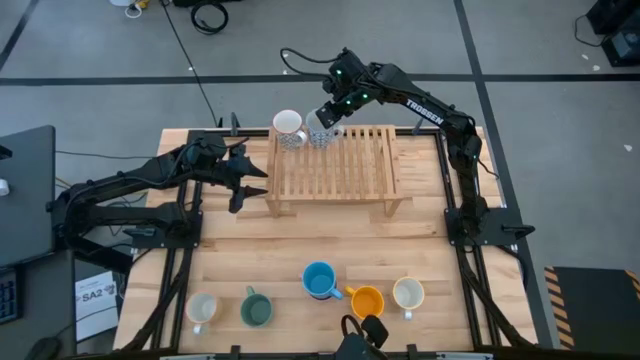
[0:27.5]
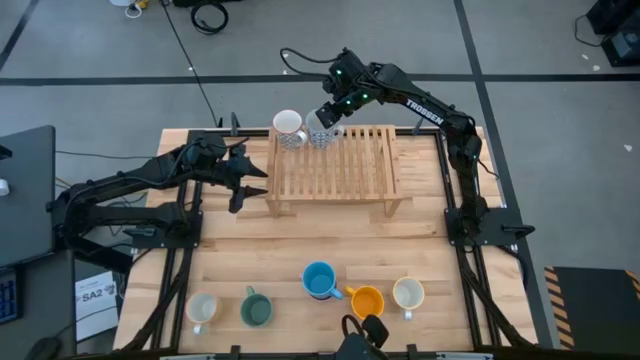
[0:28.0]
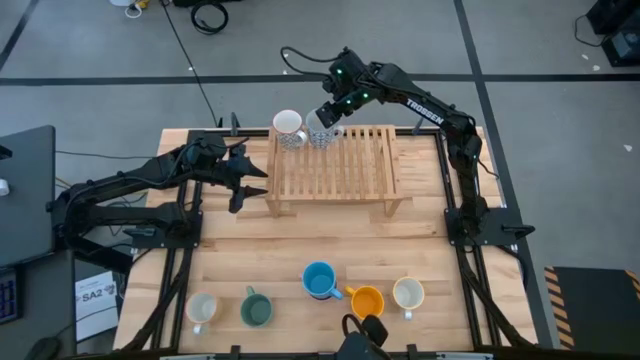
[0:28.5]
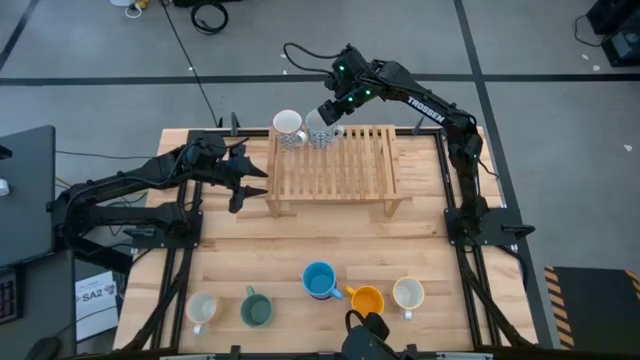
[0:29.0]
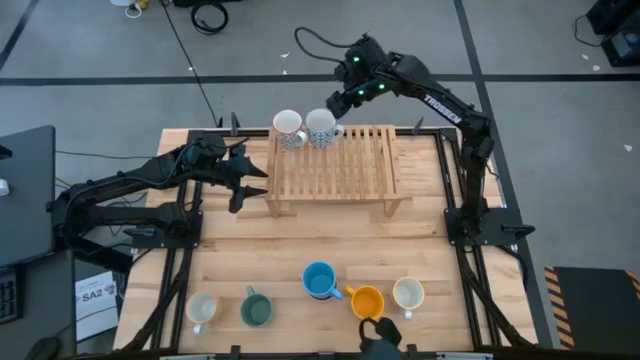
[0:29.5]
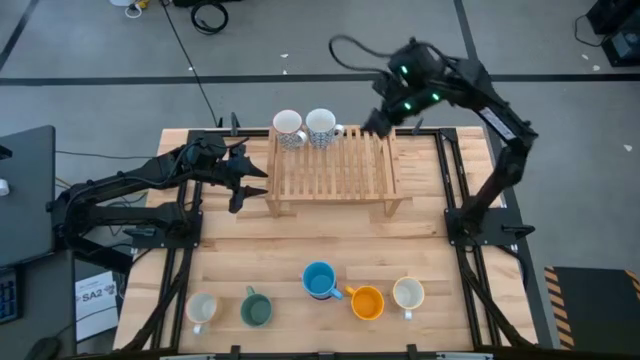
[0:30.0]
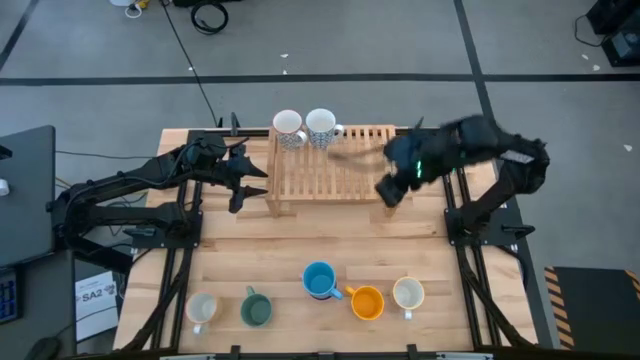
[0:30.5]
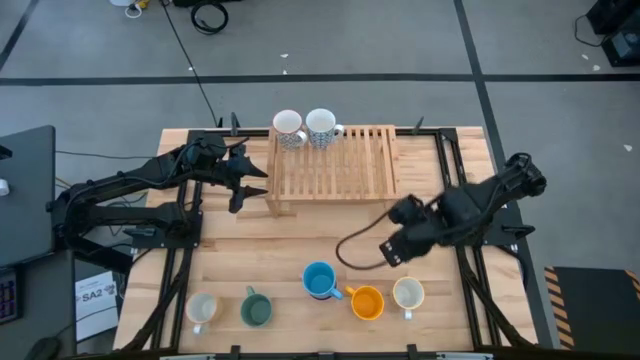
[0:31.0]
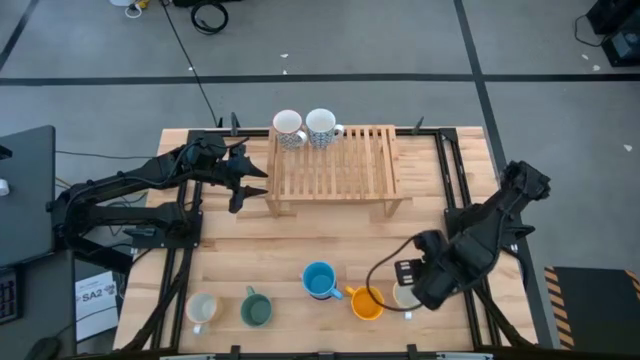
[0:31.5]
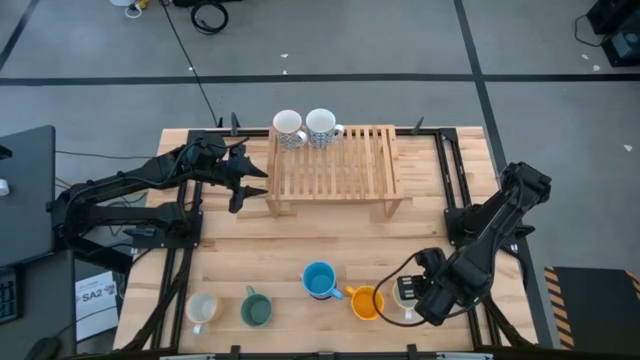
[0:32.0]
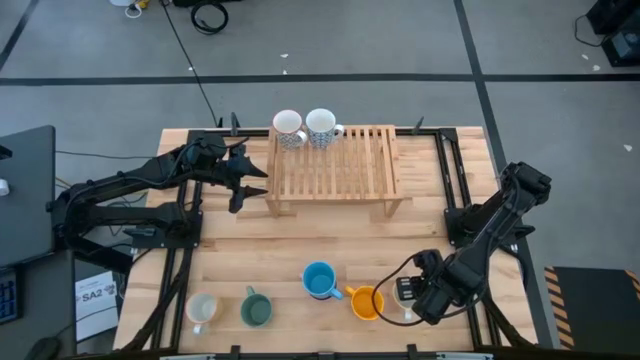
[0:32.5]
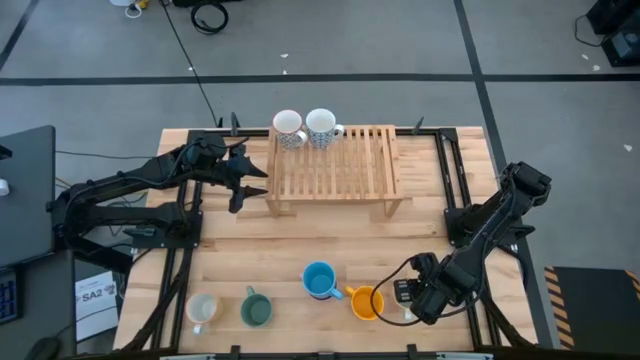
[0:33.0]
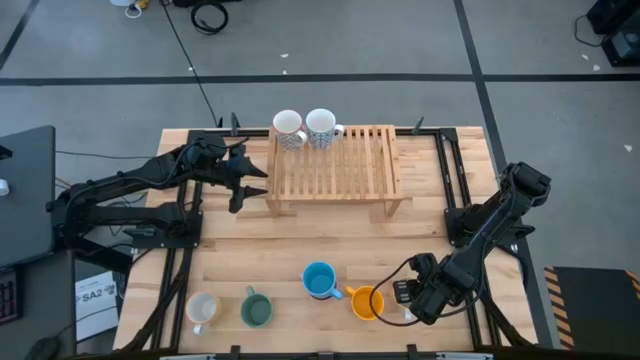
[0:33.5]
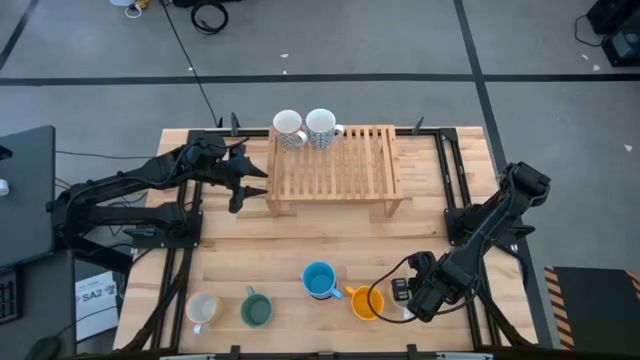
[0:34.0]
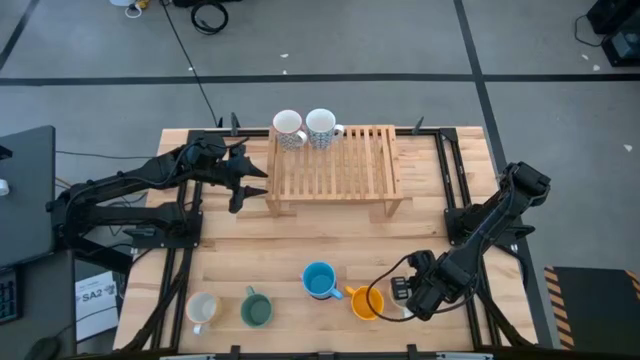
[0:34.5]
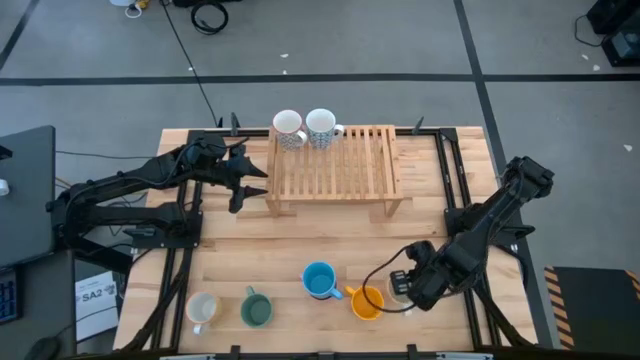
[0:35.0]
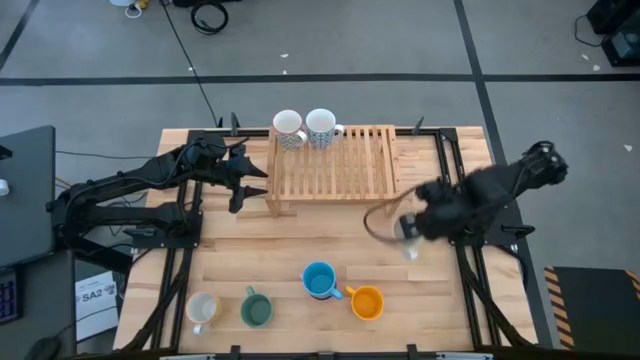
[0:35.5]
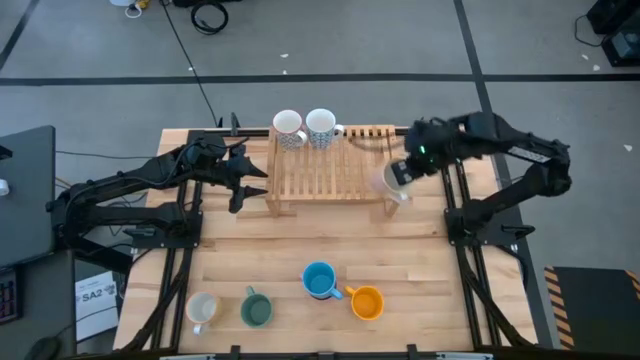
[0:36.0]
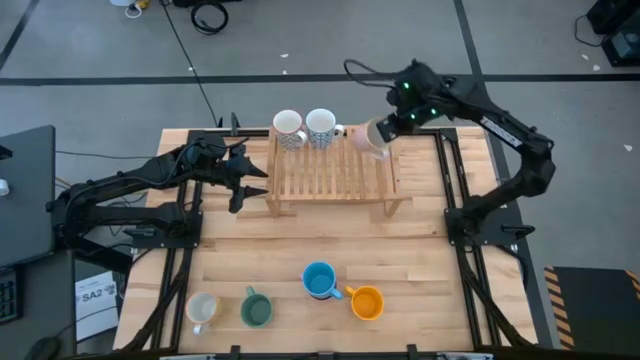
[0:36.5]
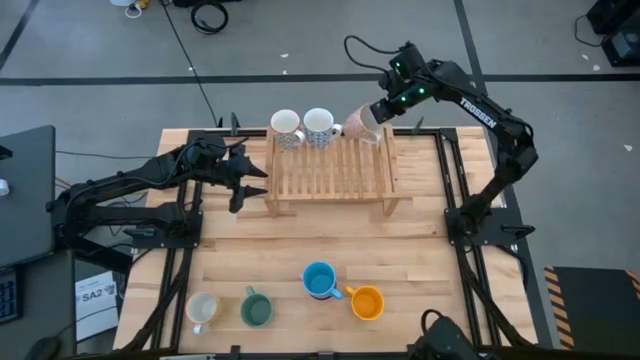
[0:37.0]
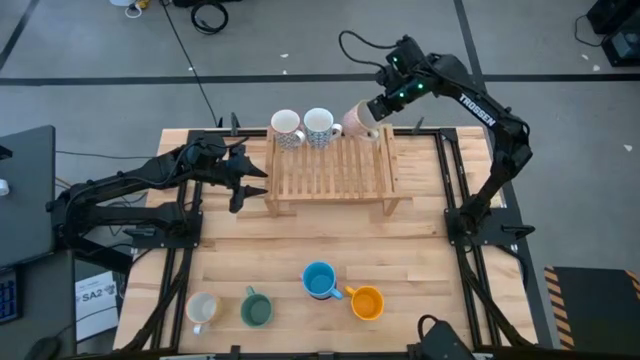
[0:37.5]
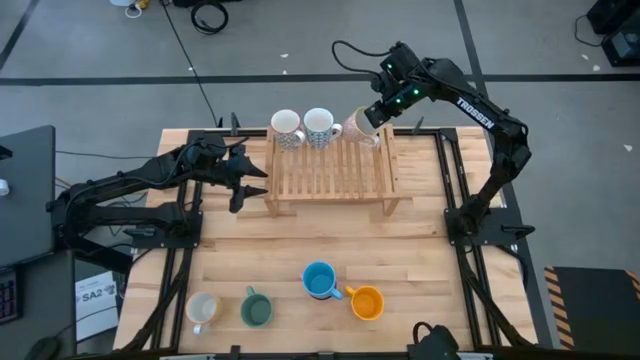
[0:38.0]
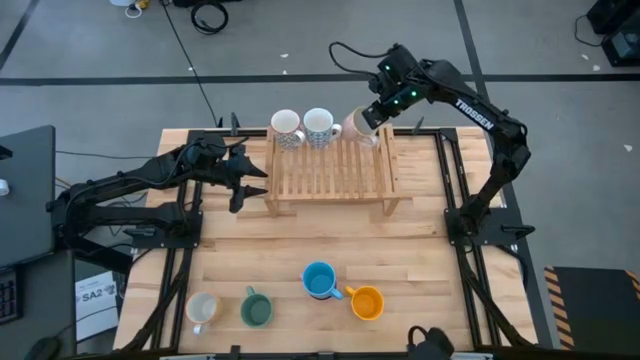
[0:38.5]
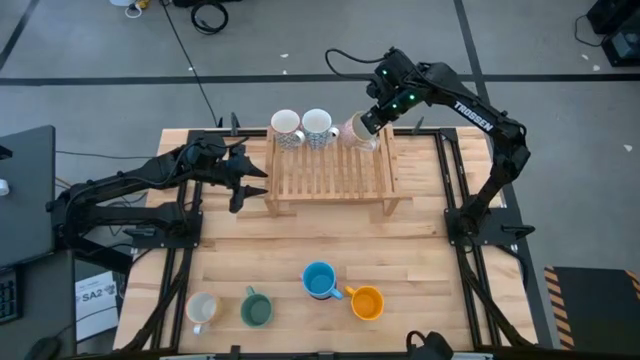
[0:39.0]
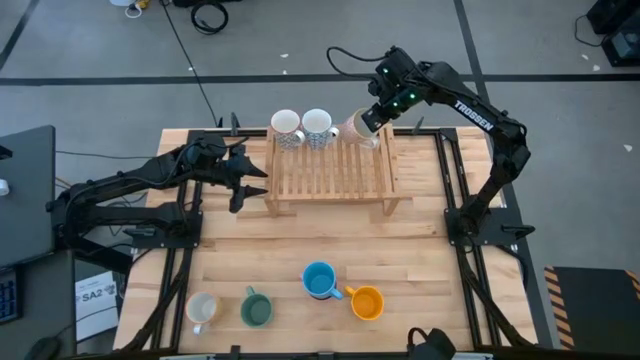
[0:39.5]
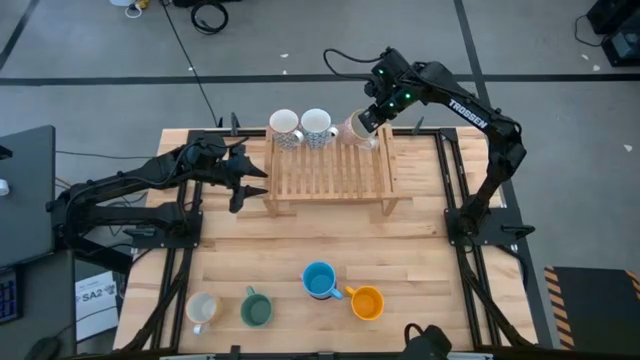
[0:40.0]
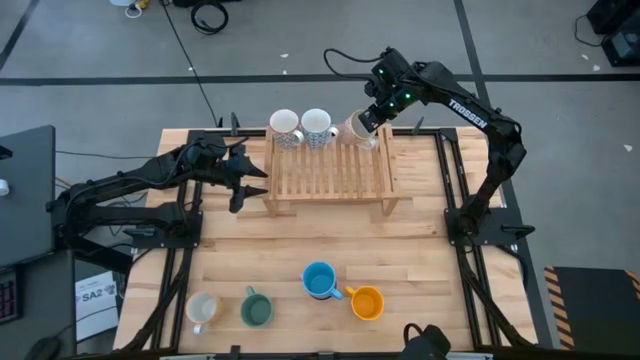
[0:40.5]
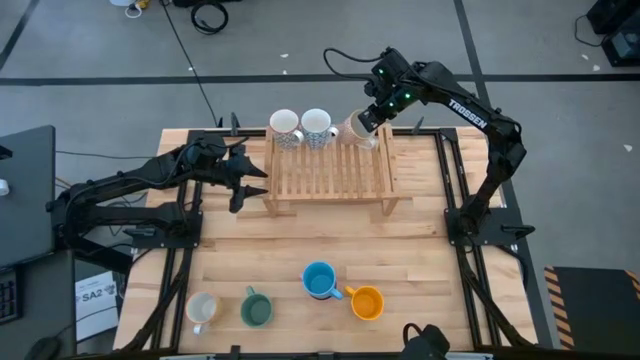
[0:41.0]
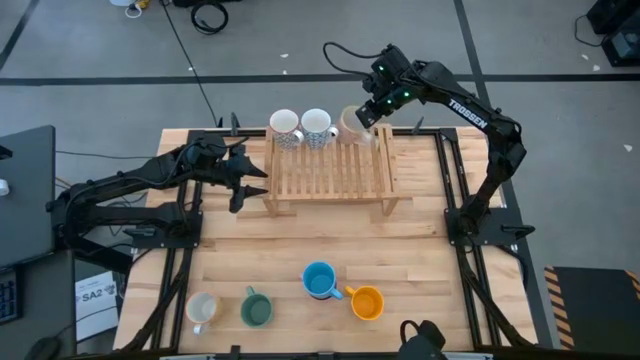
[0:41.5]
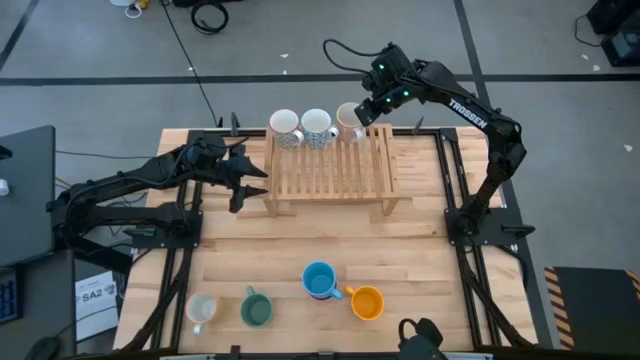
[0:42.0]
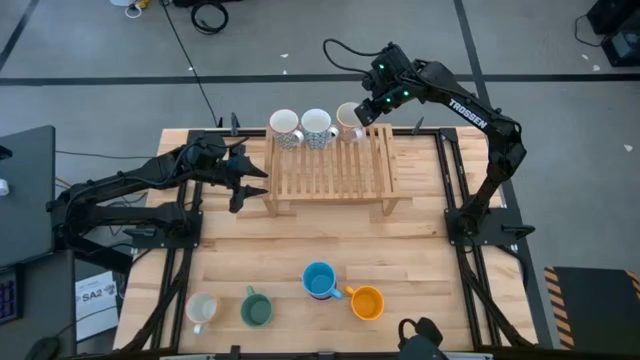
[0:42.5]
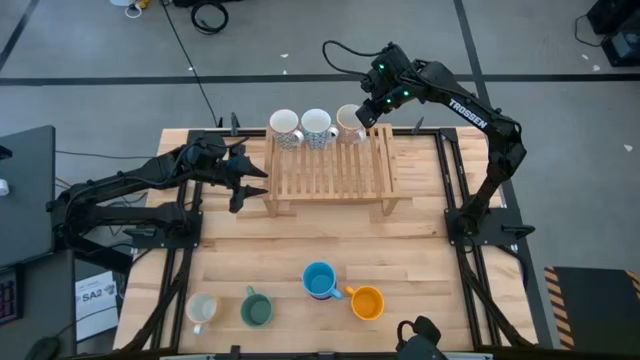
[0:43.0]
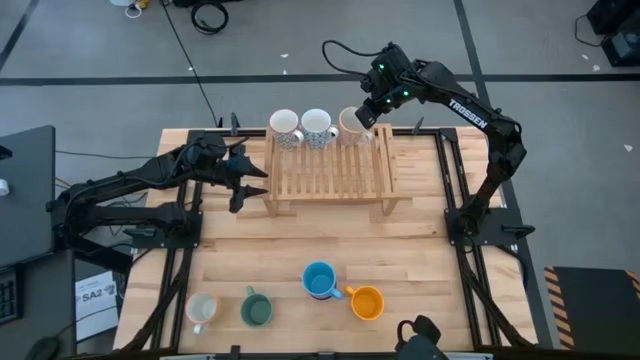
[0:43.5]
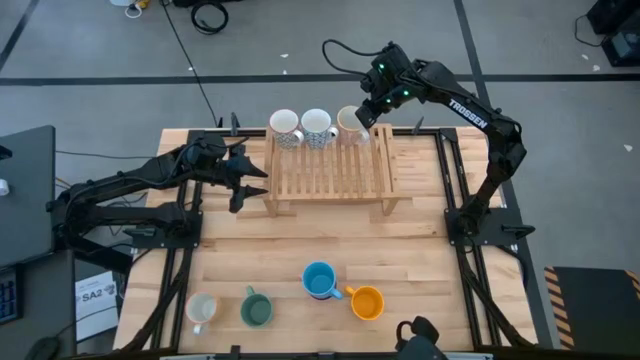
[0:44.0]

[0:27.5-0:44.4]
Task: Place coffee mugs
Put the orange mug on the shelf
